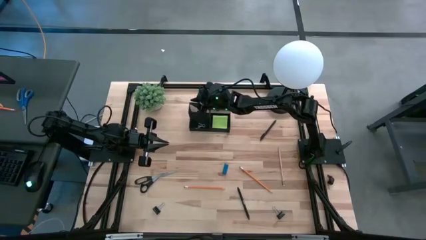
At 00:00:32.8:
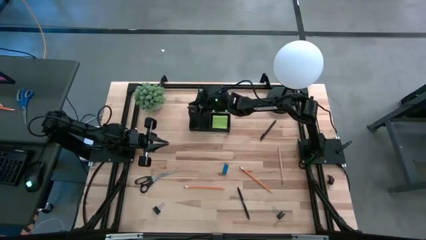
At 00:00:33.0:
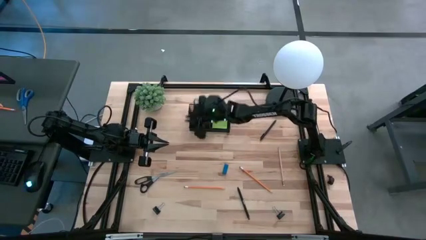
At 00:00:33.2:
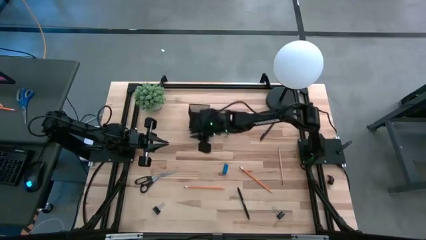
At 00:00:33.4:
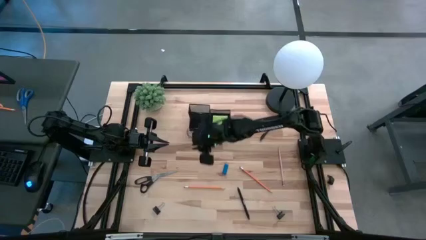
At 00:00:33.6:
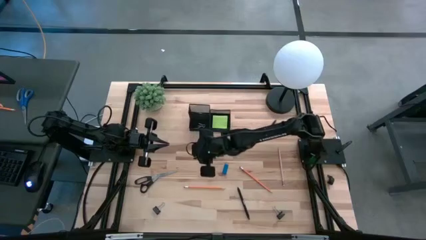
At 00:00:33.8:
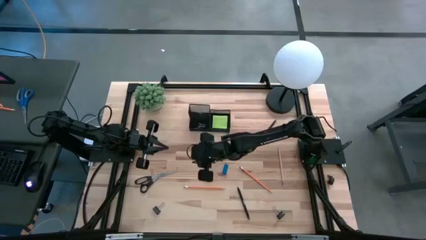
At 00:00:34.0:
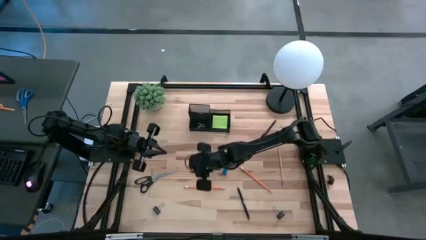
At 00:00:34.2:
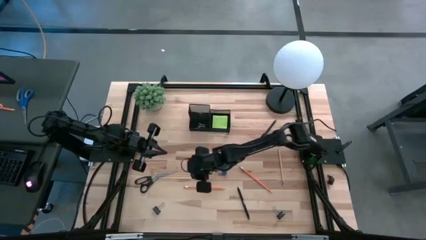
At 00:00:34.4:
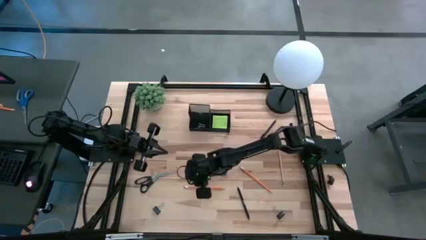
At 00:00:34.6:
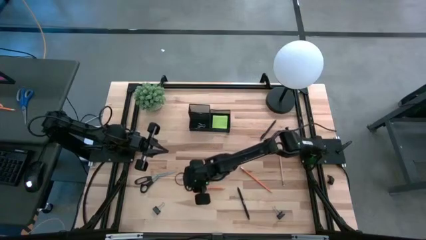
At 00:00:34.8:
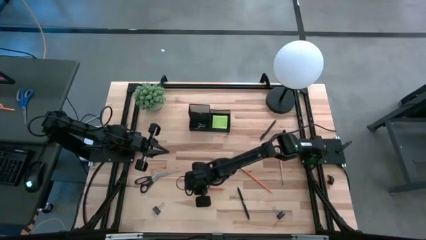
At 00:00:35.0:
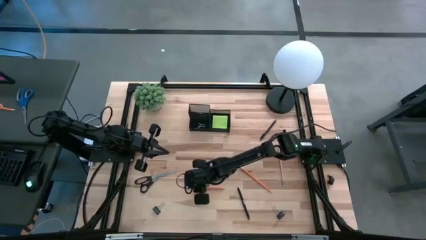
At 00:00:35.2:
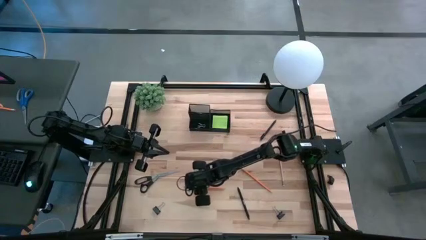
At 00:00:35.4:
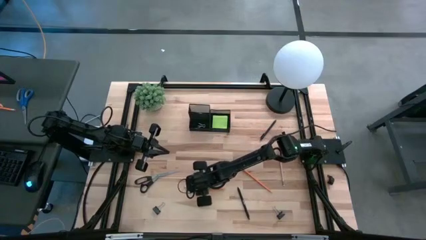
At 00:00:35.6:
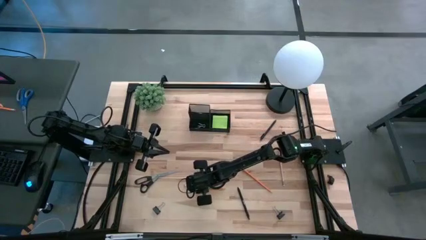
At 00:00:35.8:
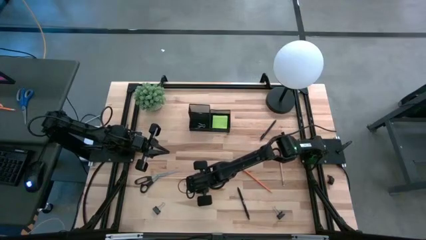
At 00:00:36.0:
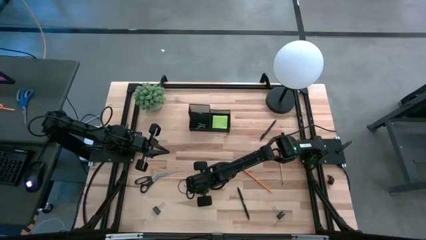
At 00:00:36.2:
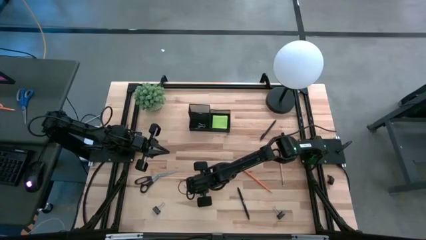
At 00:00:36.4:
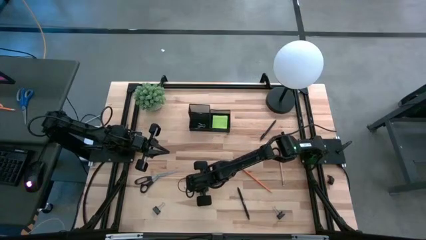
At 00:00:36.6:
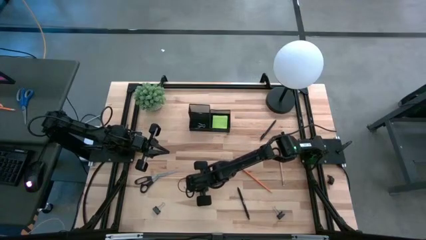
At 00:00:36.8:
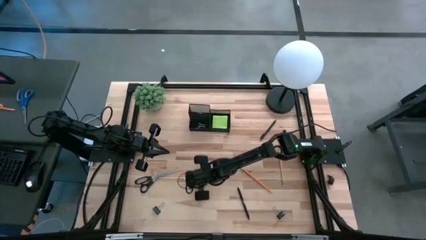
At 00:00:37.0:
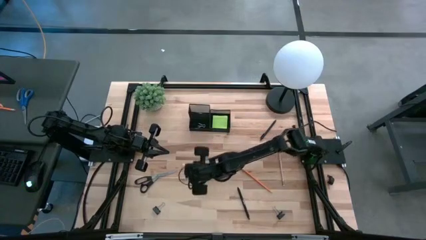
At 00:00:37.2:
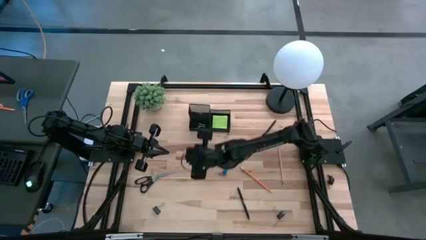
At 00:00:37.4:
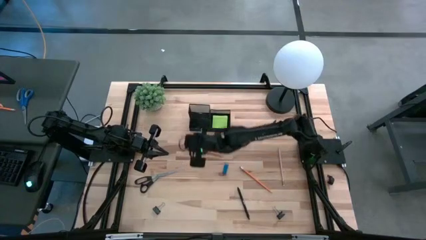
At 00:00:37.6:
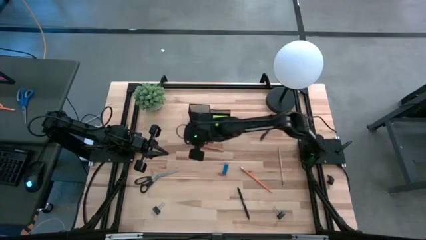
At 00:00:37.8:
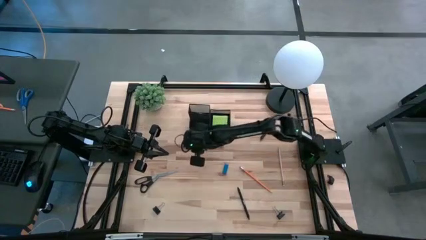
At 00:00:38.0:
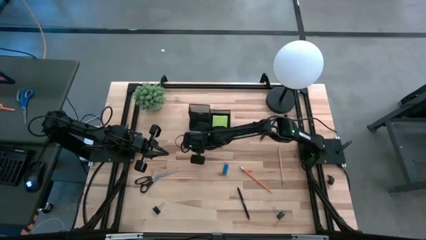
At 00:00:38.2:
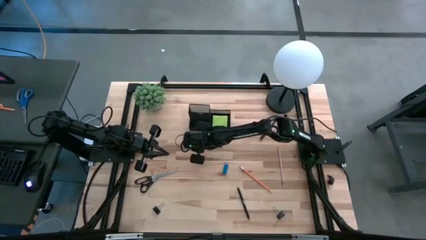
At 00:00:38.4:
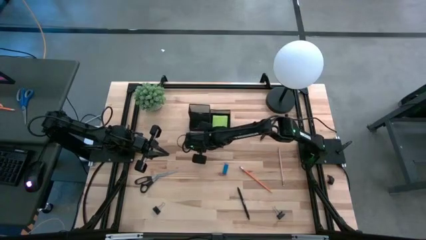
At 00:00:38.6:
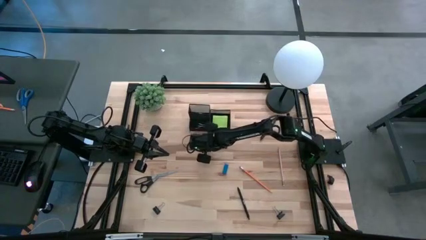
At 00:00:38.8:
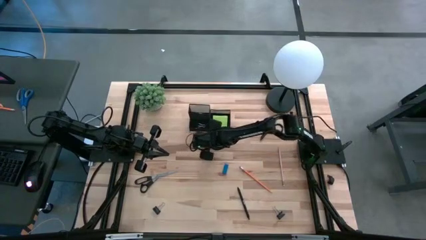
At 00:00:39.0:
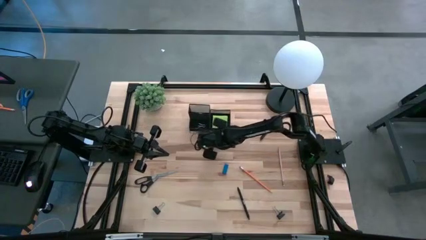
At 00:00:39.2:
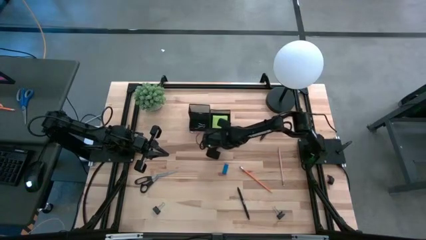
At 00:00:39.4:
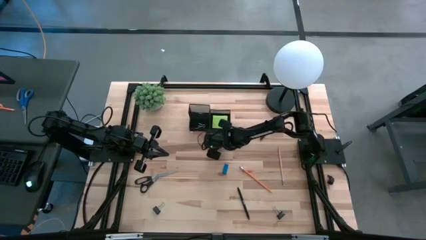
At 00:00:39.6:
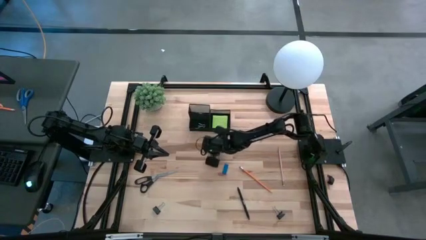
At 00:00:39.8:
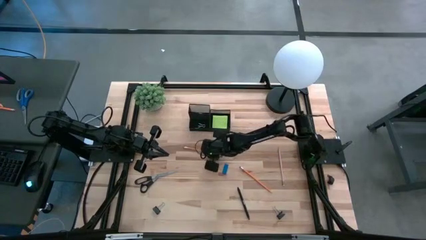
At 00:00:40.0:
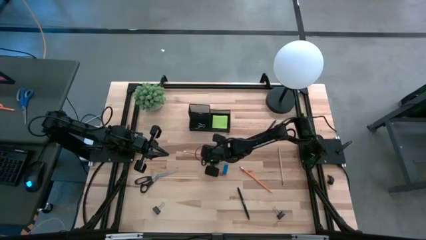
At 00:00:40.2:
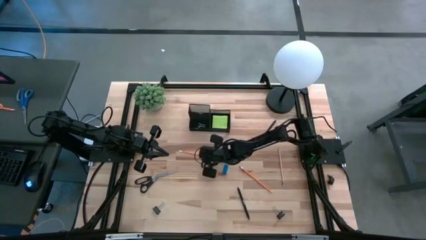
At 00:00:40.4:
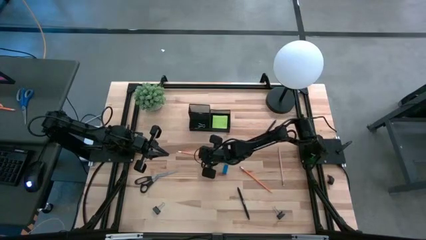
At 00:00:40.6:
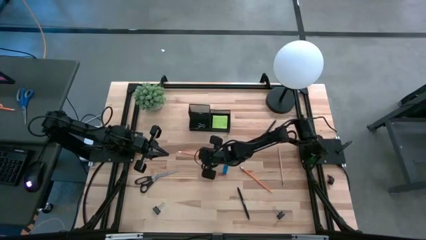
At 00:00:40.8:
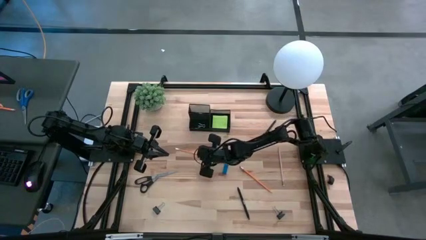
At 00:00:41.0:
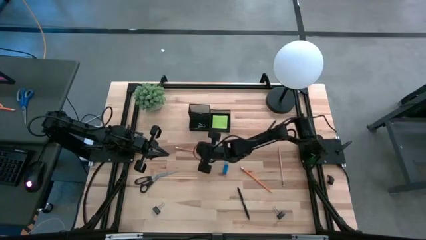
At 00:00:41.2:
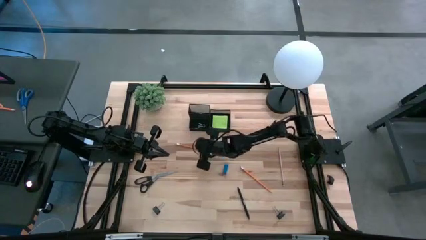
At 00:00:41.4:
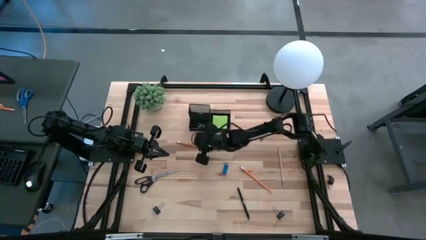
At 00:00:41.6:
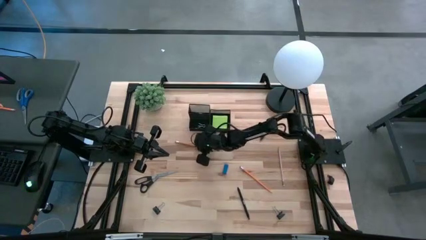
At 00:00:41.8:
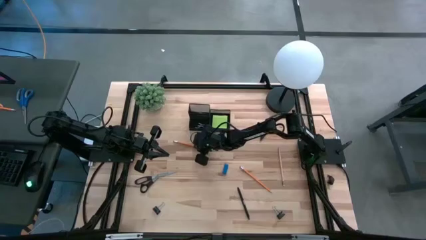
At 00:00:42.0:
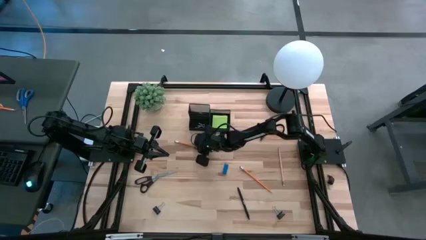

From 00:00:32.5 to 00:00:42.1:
Task: Pick and place office supplies into organizer
Put the left yellow pencil into the organizer bin

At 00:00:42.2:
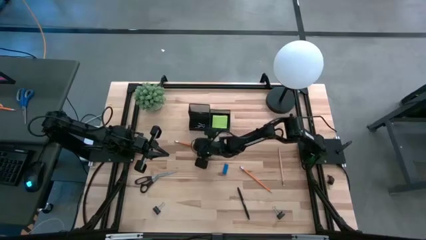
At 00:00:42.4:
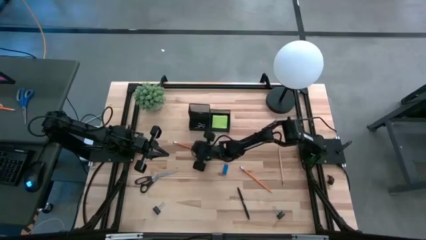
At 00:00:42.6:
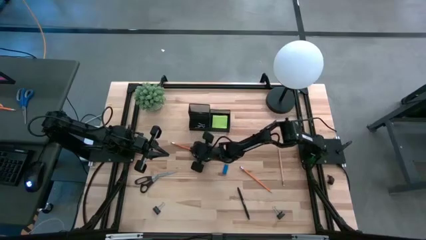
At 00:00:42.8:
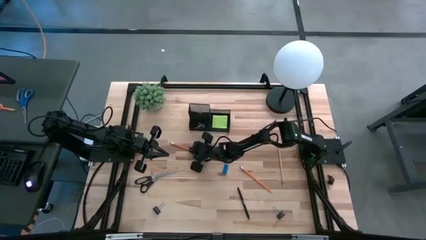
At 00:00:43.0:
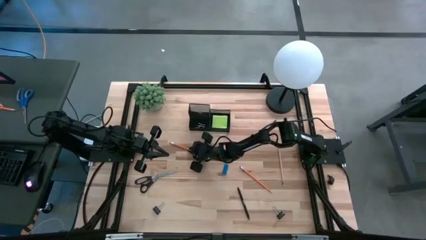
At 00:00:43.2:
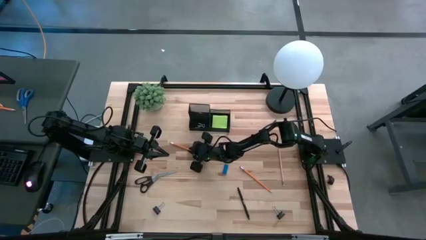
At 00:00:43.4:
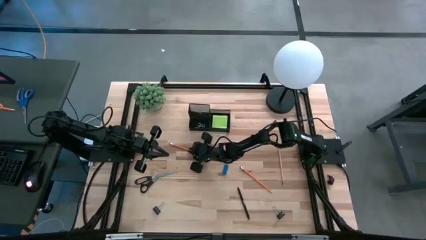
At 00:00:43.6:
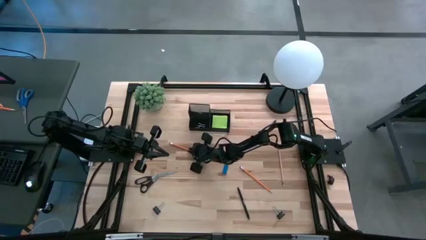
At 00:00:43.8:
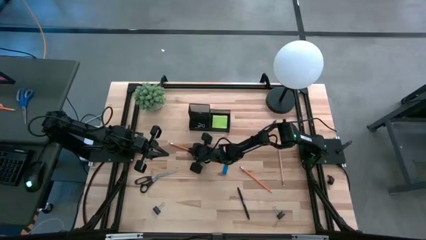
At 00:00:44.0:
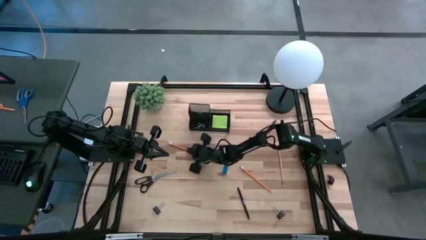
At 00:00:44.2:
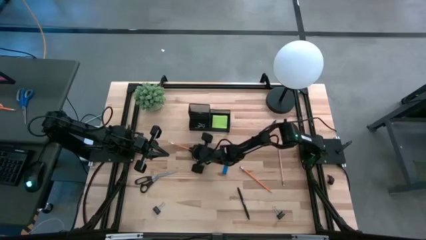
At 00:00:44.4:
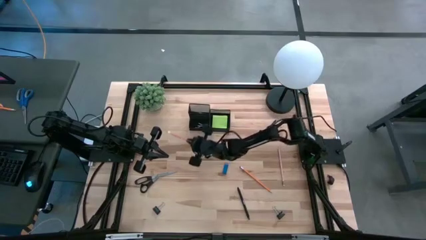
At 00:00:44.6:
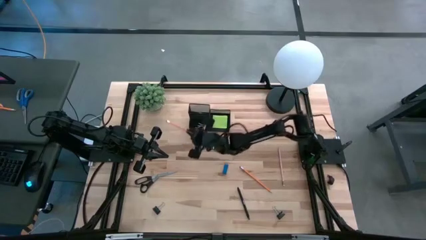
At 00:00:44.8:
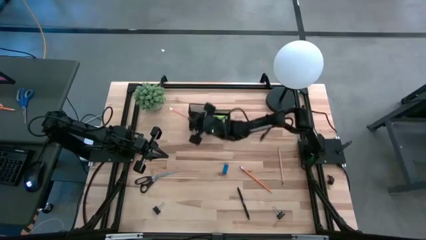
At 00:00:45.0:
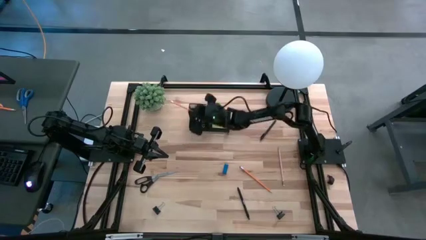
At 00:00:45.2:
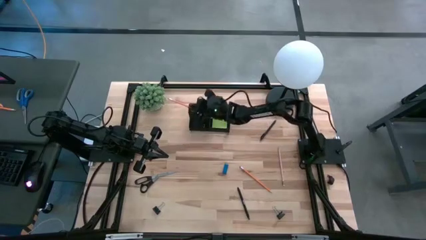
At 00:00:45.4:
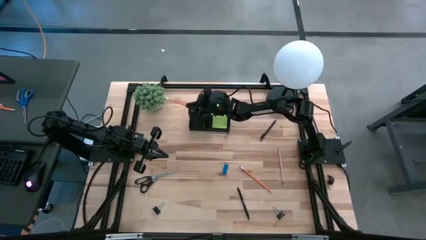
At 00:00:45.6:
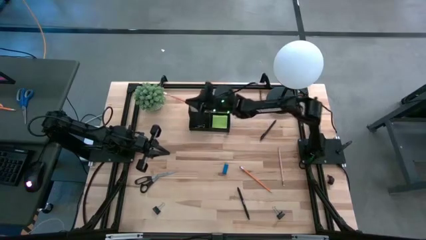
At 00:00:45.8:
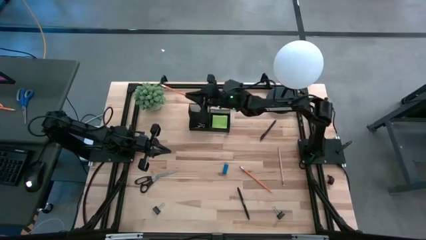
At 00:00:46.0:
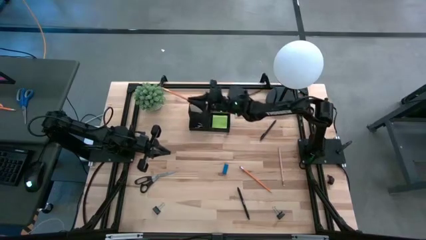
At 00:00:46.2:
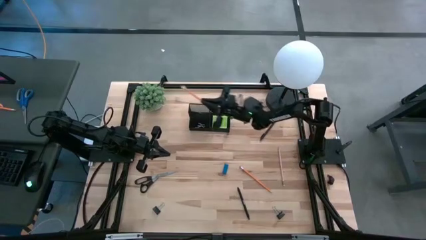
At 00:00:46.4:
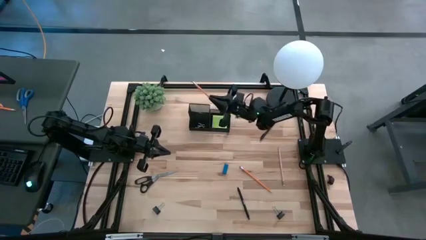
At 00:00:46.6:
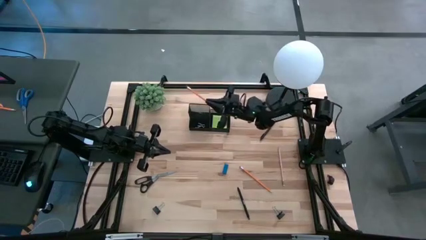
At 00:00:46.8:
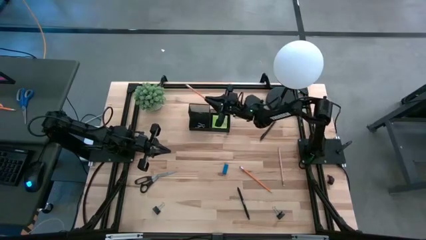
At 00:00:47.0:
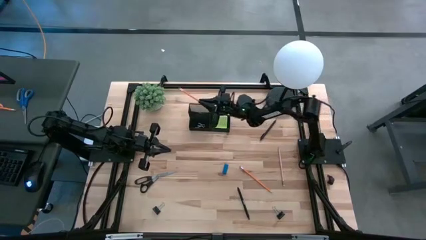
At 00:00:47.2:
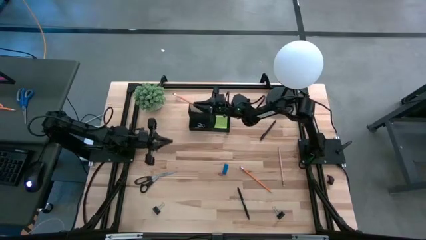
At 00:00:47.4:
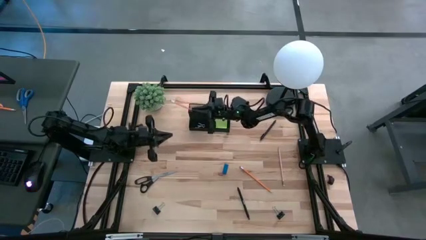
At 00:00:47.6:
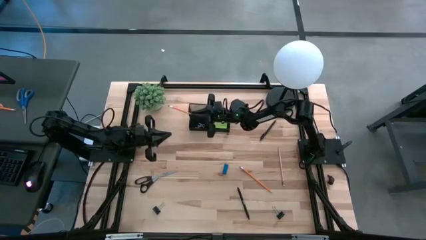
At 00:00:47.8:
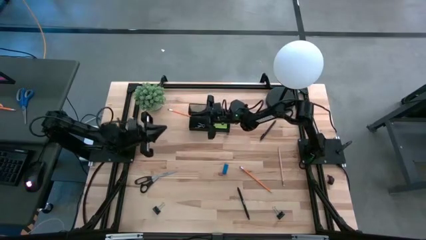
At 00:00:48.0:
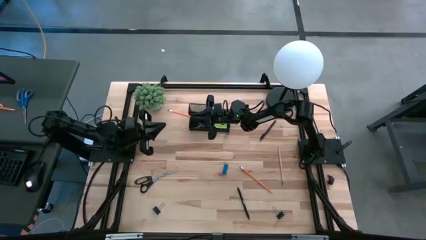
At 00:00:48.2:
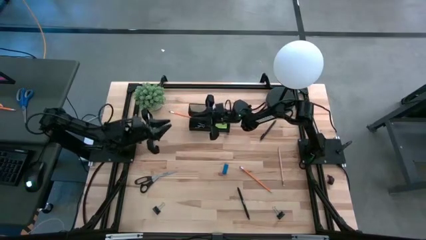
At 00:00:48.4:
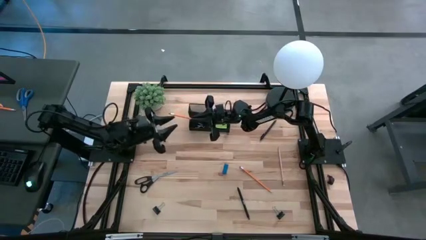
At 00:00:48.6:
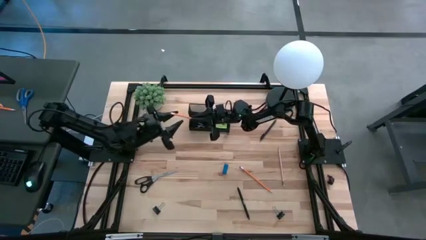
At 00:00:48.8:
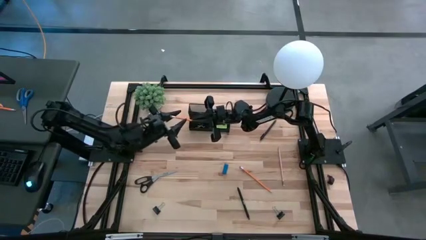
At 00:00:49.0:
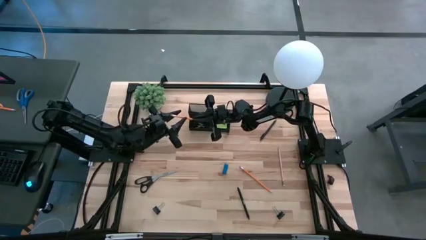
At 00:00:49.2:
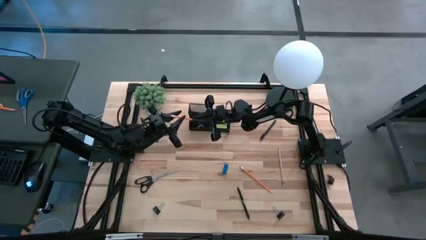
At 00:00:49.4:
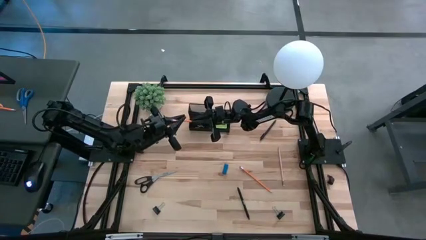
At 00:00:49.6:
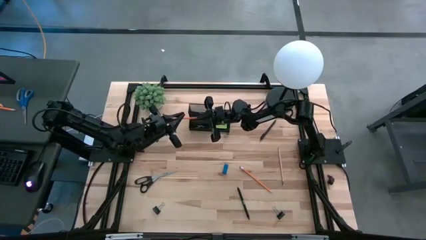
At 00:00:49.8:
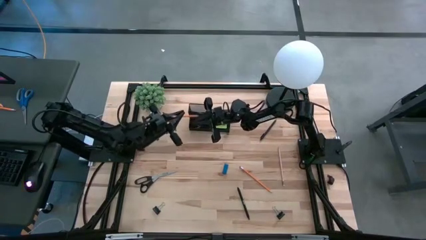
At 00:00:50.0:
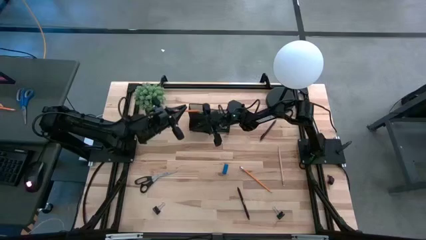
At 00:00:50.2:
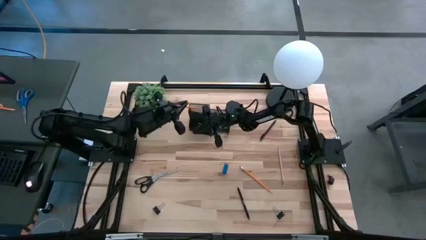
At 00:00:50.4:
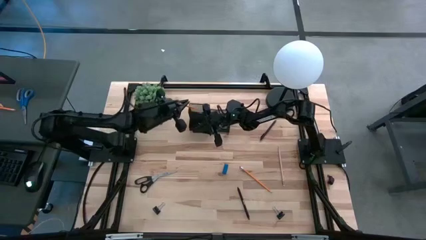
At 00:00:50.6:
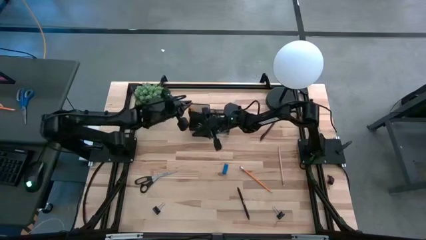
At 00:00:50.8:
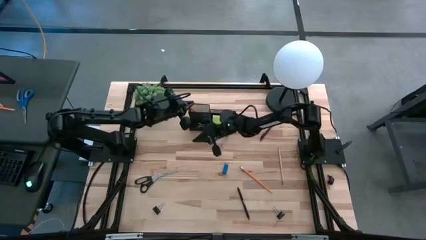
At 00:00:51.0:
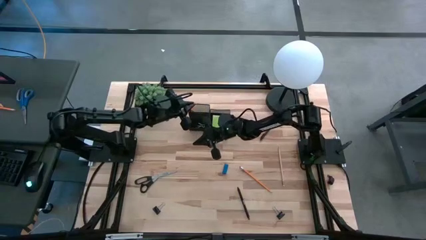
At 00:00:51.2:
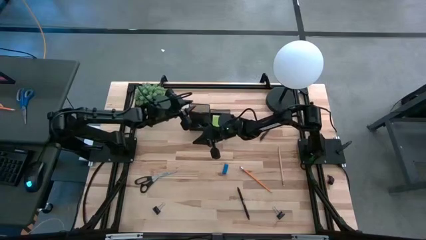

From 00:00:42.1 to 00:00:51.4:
Put the left yellow pencil into the organizer bin
